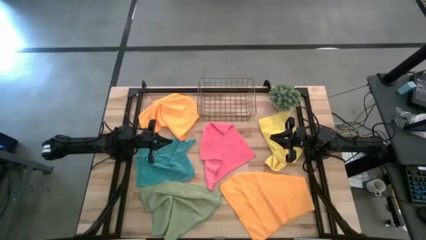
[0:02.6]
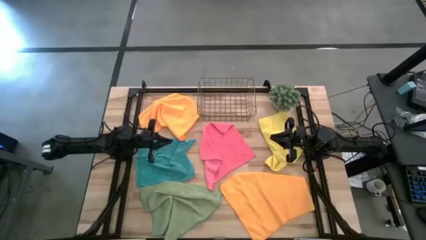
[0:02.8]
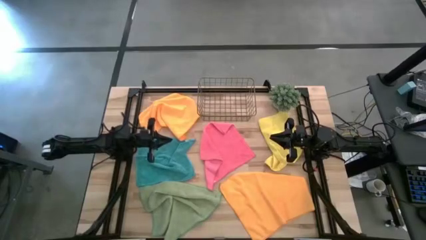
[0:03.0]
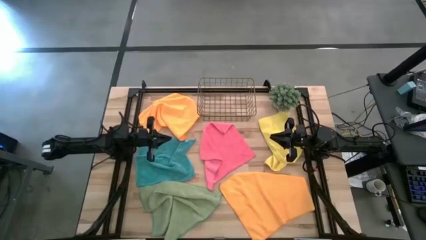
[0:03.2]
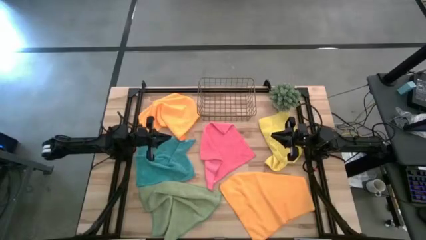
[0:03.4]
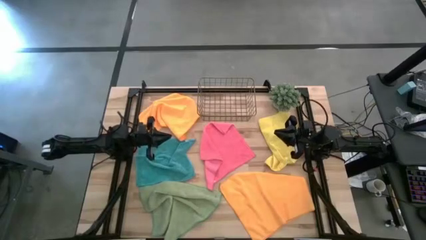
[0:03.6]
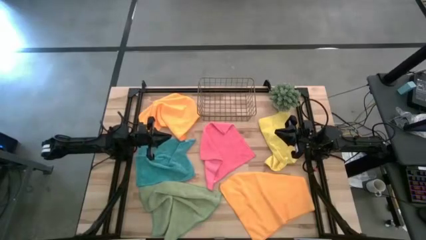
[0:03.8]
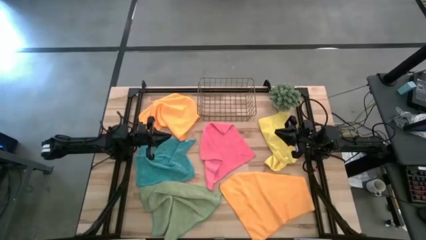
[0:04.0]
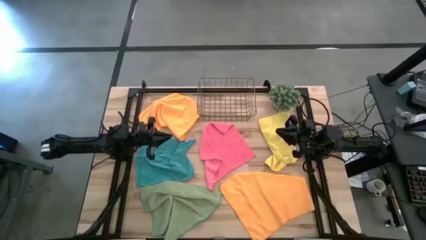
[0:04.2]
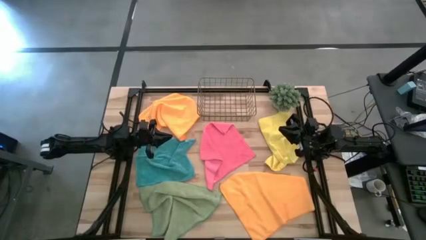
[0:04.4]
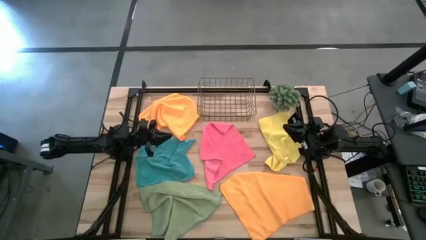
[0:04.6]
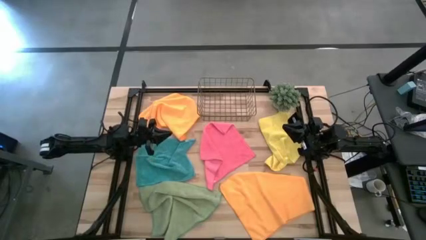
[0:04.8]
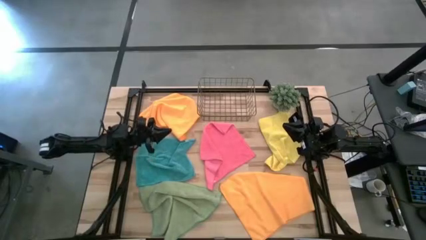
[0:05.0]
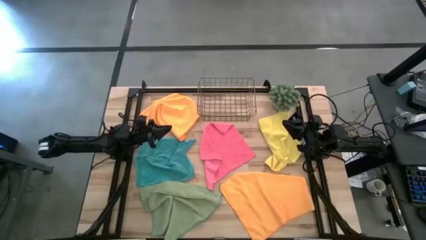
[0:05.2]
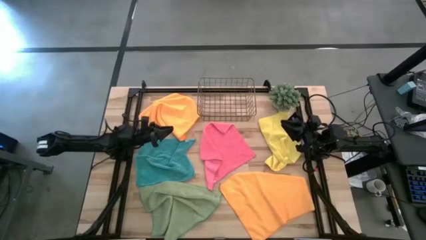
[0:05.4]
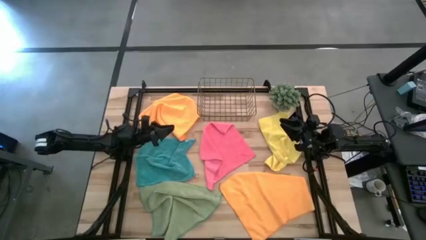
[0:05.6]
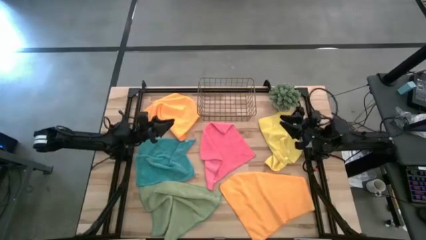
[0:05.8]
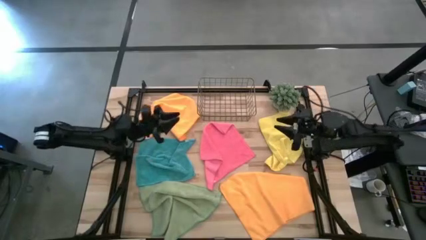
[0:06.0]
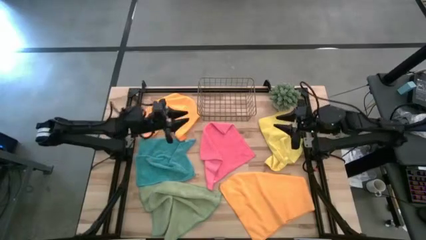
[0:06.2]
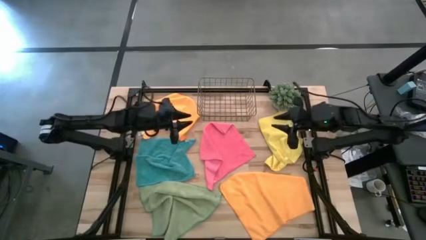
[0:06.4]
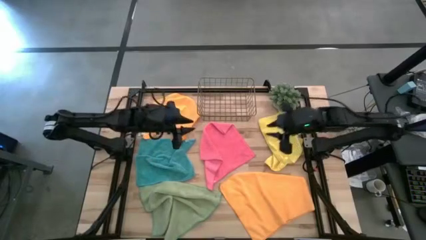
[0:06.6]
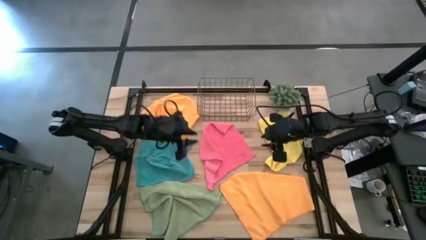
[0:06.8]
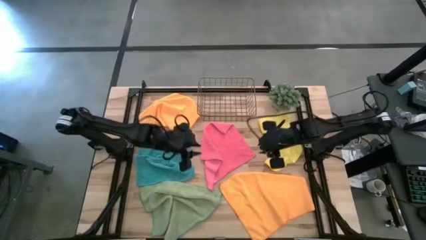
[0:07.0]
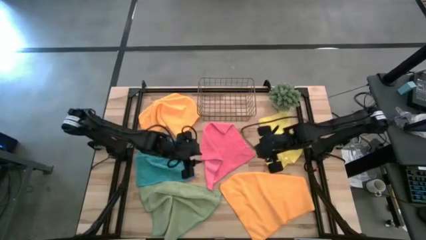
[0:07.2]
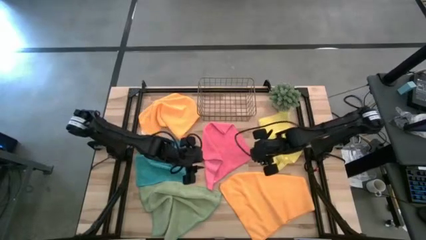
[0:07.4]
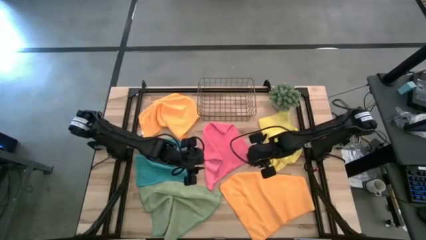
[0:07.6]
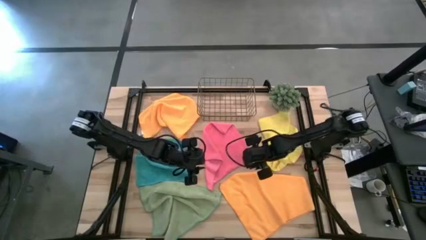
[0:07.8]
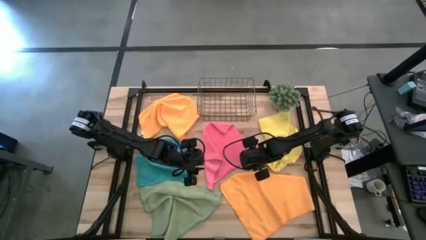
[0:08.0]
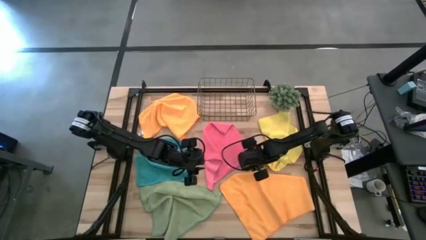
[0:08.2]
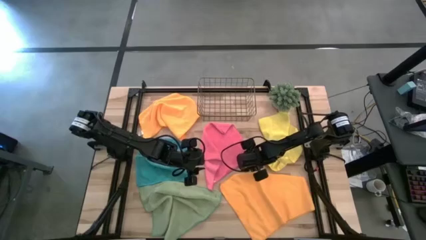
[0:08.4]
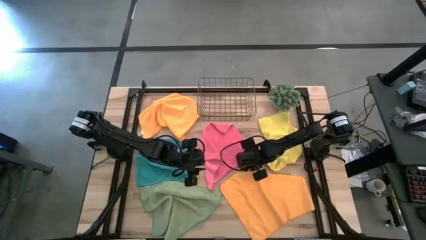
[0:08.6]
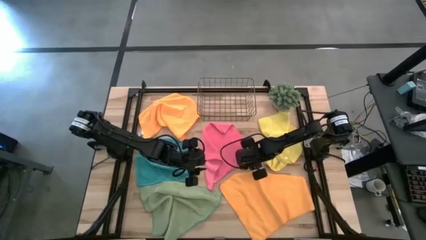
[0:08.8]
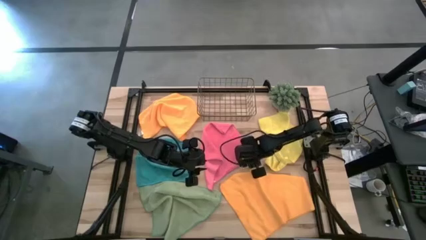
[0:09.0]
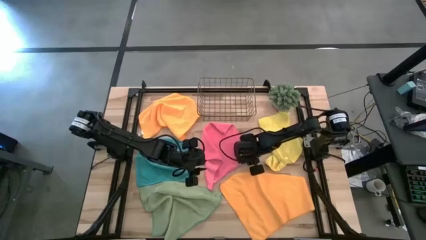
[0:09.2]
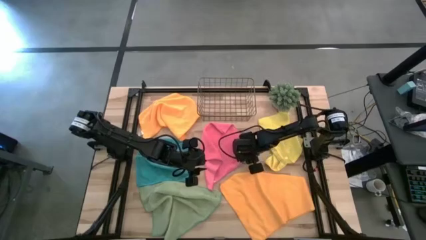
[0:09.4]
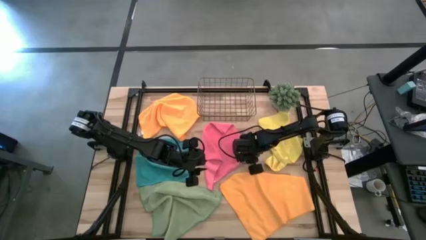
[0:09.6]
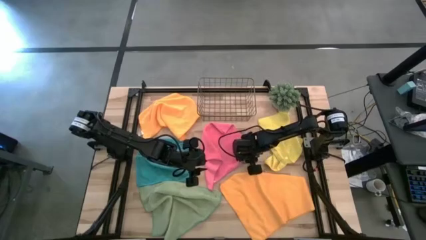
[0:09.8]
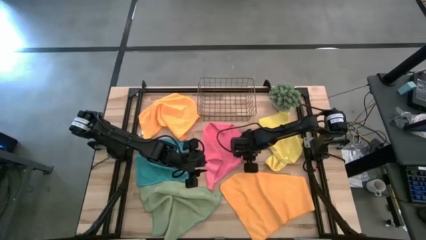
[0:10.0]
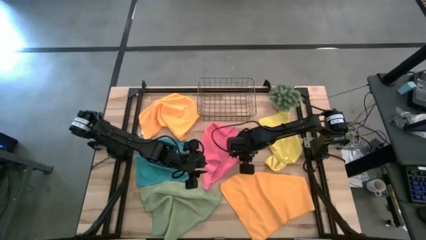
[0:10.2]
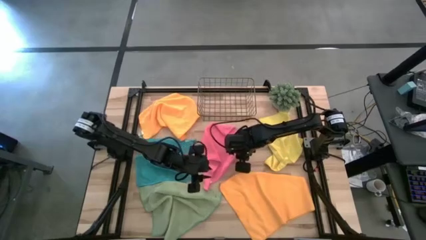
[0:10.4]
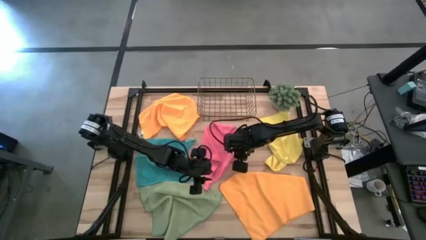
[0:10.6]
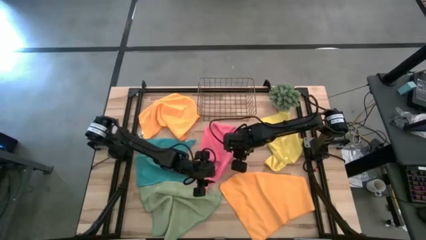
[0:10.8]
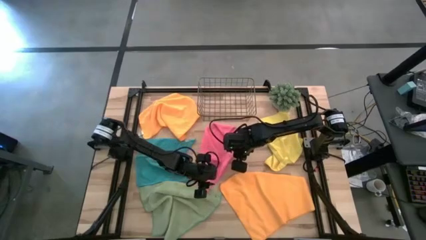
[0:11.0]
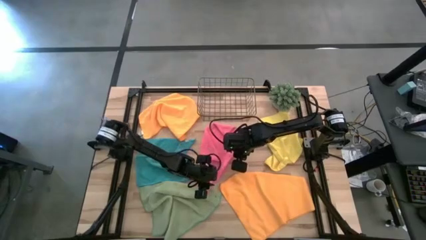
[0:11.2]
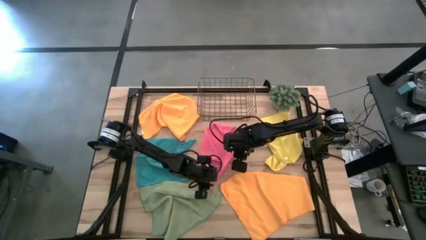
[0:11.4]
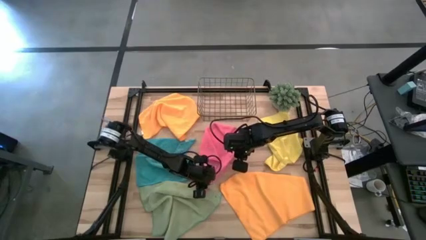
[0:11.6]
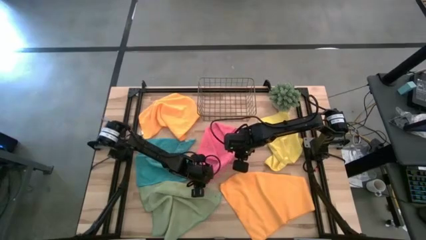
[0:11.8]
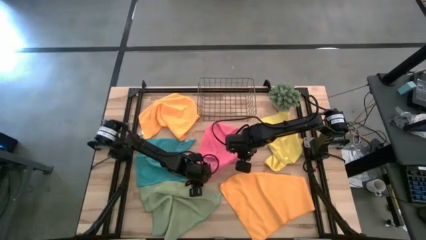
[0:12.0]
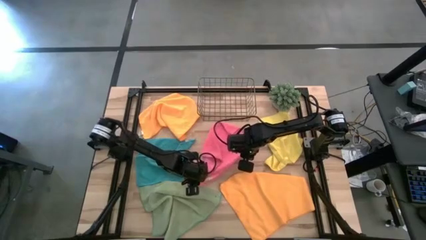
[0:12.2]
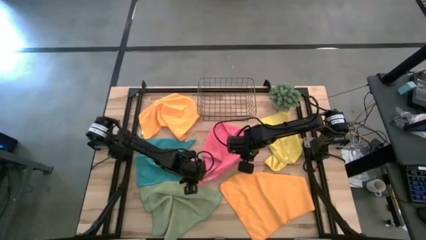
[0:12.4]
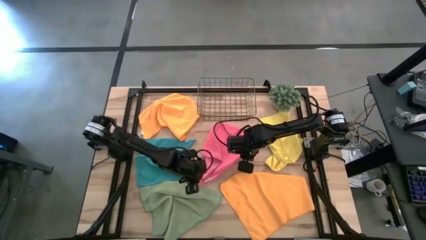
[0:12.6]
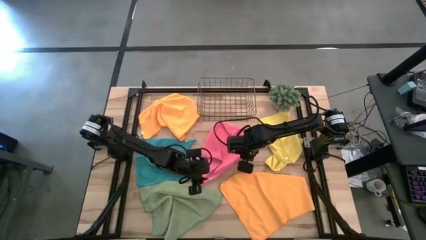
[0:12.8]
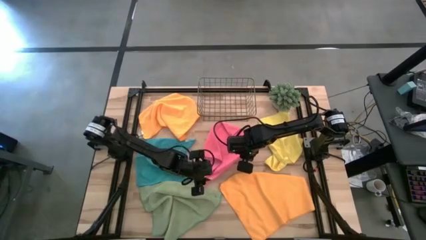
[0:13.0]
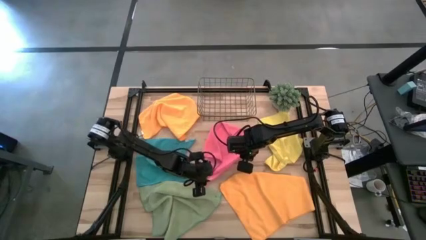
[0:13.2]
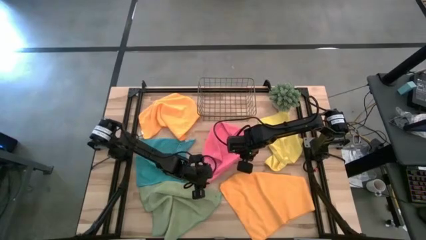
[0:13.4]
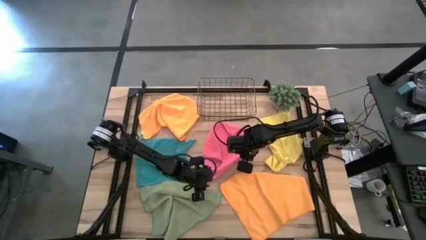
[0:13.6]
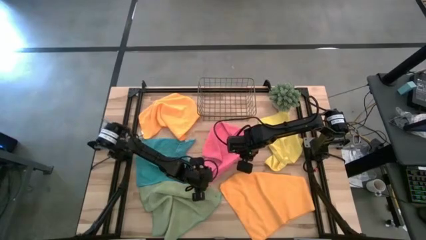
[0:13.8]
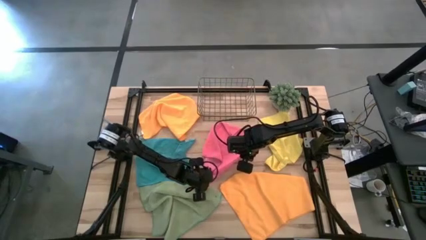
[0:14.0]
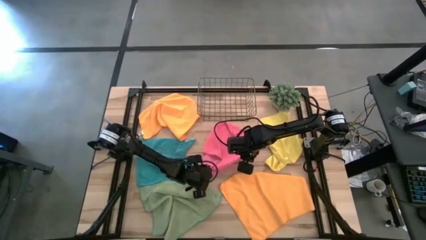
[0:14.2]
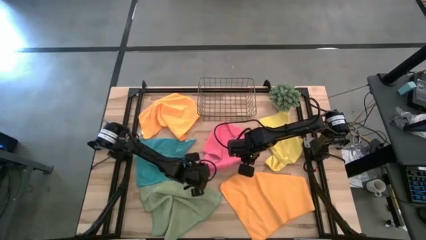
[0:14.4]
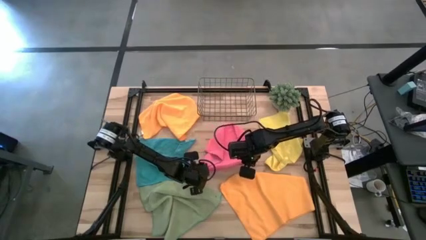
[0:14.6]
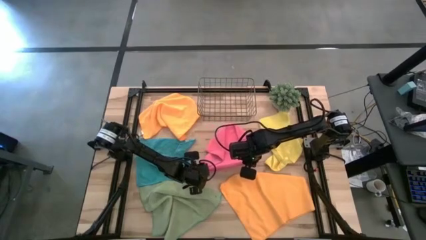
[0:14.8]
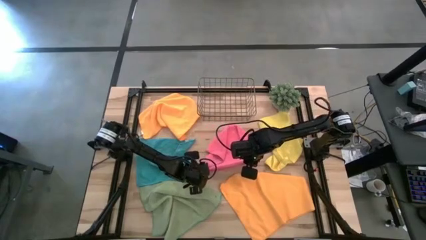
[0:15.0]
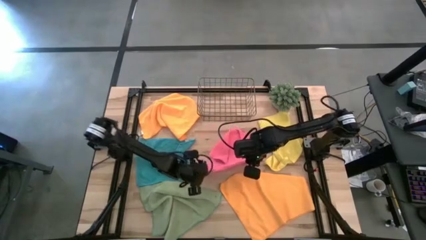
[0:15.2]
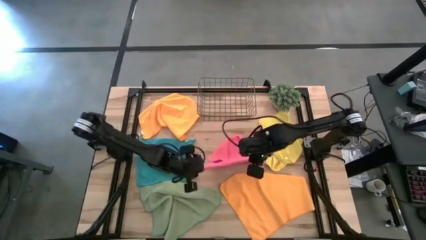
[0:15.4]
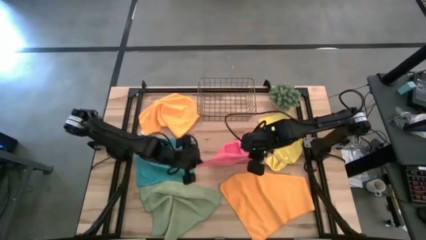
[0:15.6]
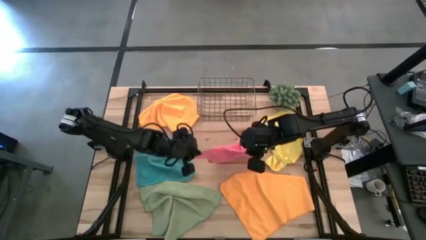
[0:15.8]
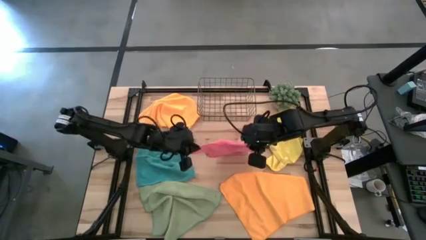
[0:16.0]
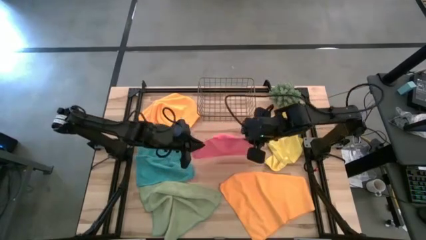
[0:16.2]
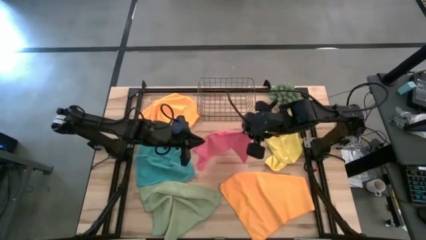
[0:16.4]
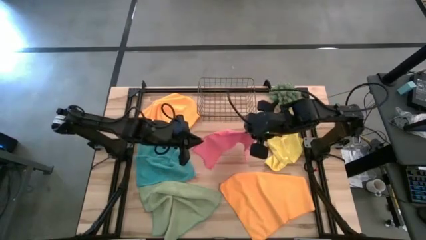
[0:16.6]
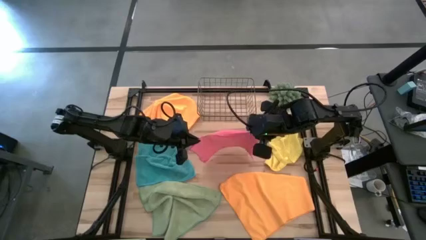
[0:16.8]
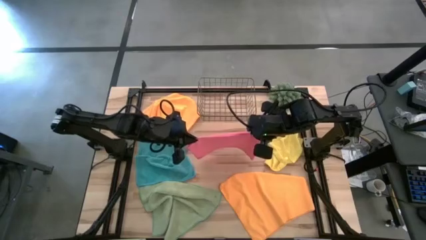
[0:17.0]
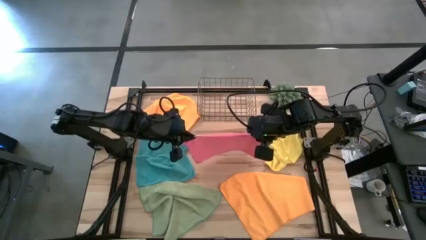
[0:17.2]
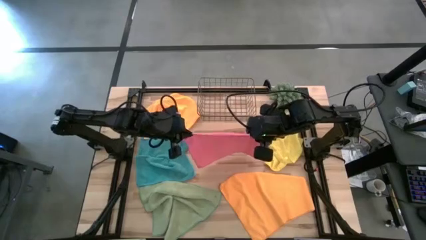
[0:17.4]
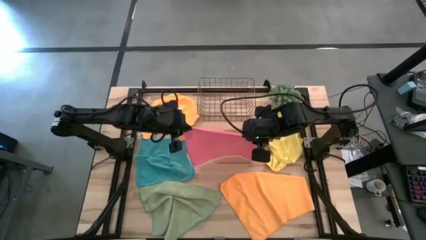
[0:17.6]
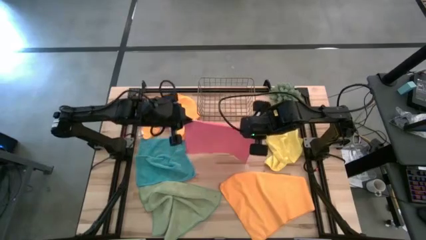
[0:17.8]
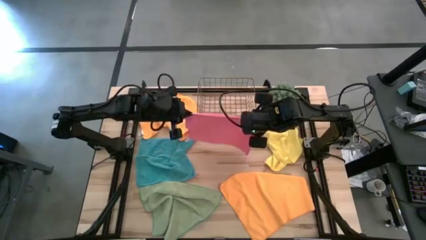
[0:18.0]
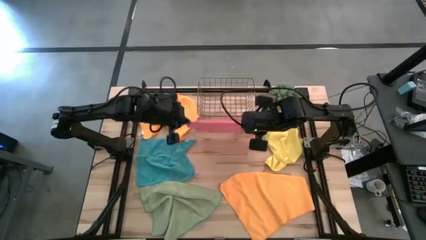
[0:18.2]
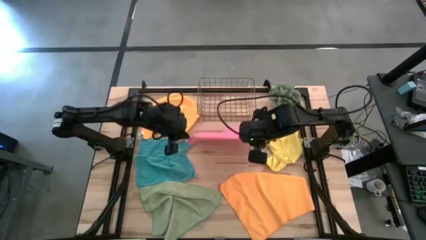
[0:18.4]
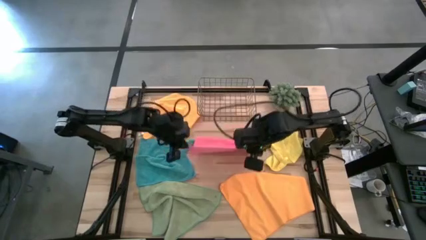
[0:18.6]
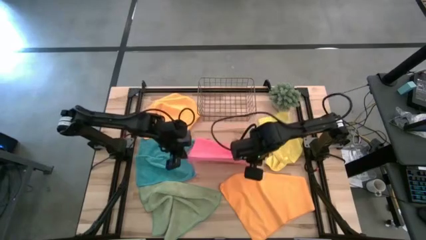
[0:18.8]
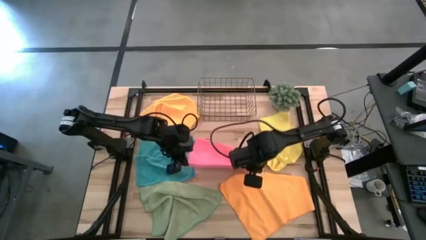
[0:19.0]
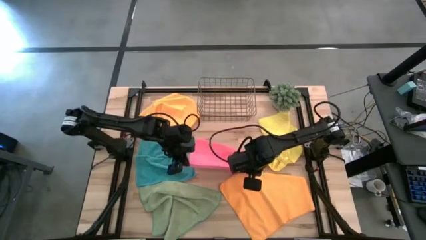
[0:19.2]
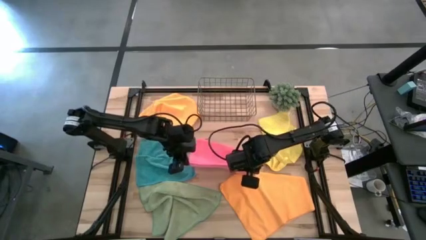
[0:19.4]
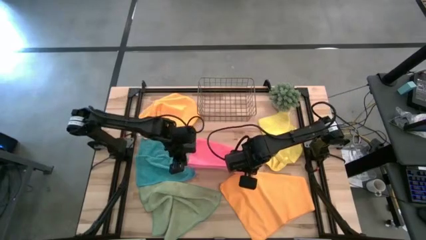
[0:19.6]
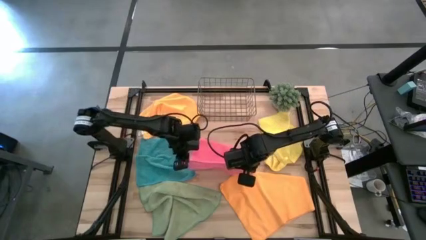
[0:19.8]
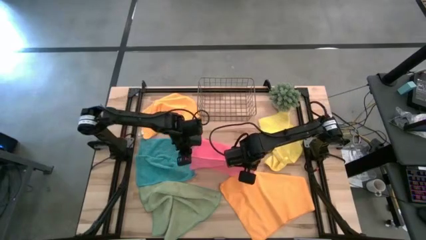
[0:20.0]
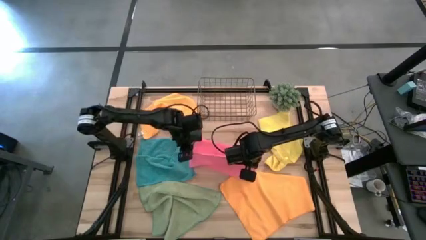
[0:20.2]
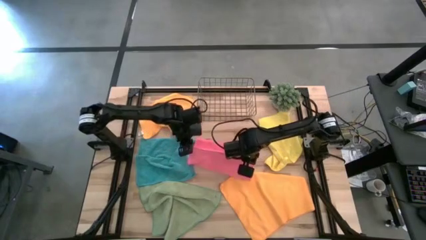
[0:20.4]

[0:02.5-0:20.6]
Task: Fold microfiber towels
Fold the pink microfiber cloth
